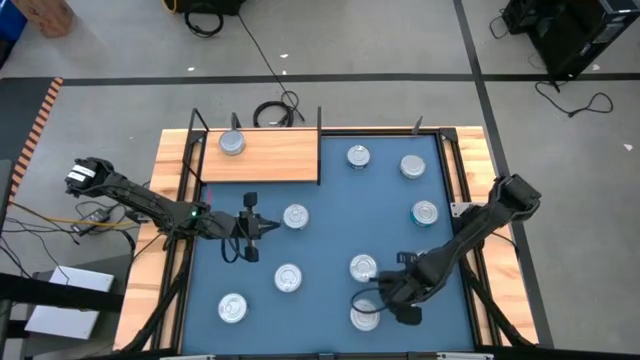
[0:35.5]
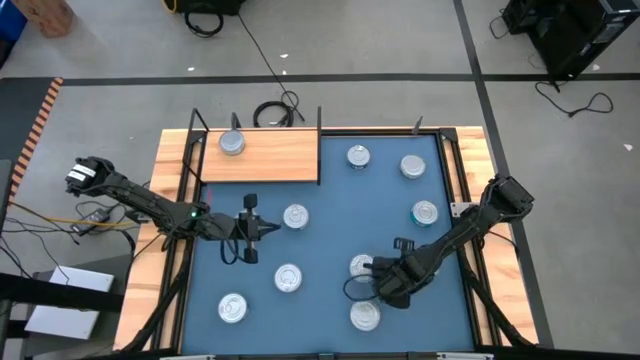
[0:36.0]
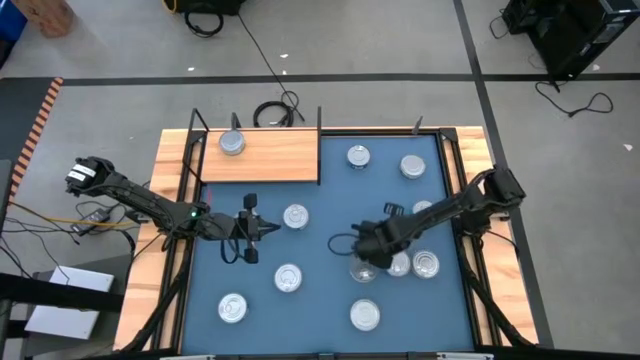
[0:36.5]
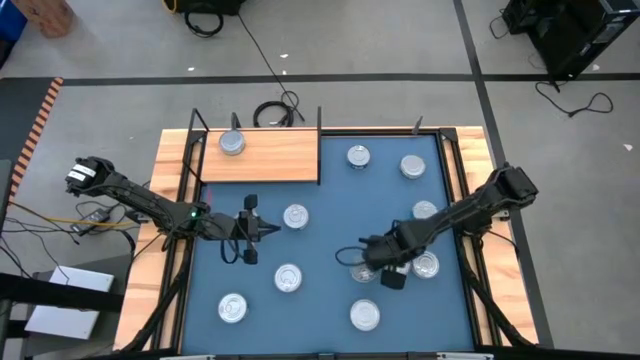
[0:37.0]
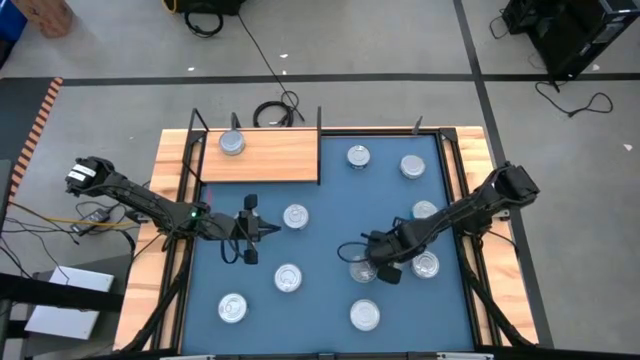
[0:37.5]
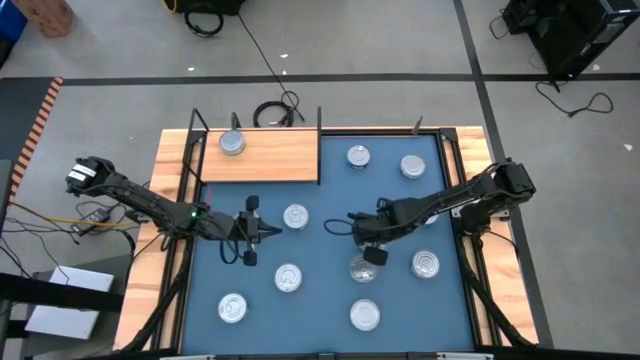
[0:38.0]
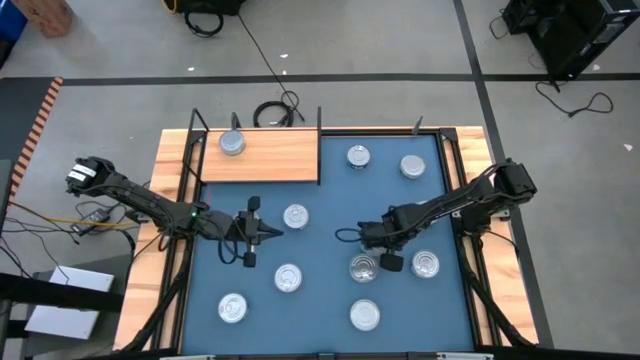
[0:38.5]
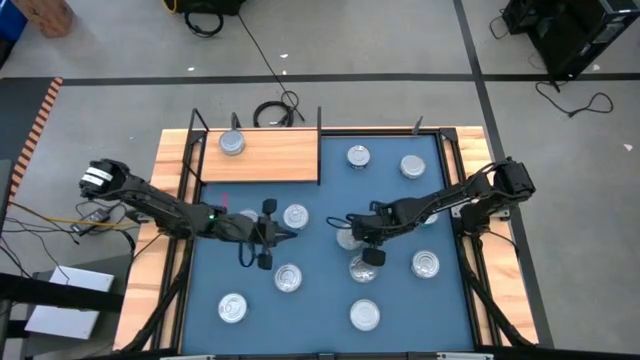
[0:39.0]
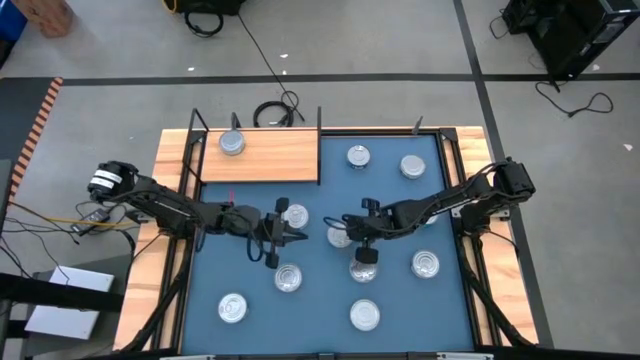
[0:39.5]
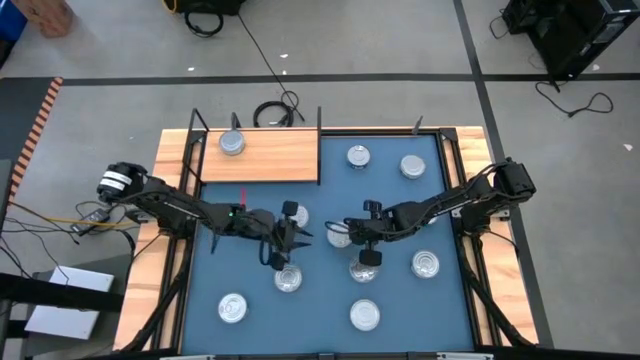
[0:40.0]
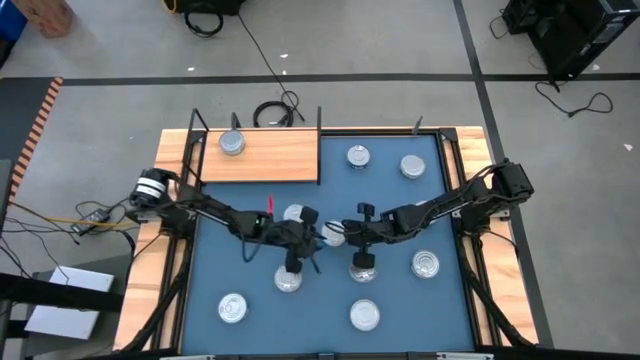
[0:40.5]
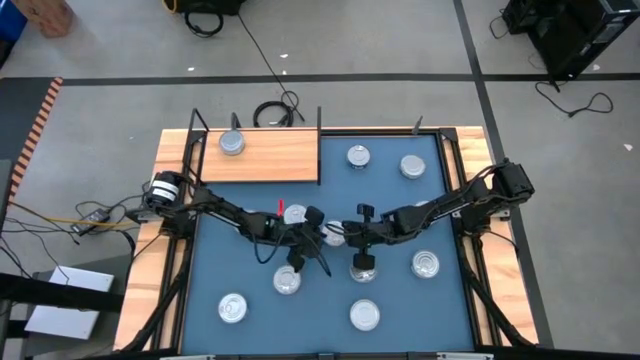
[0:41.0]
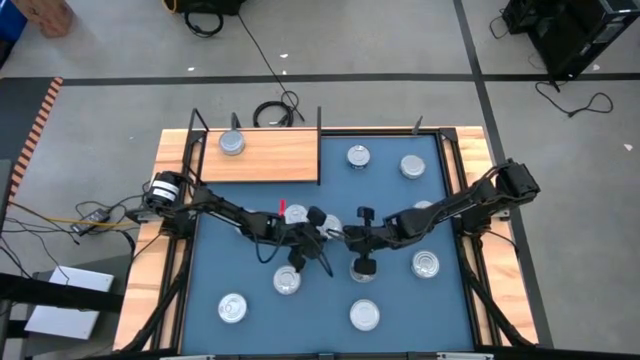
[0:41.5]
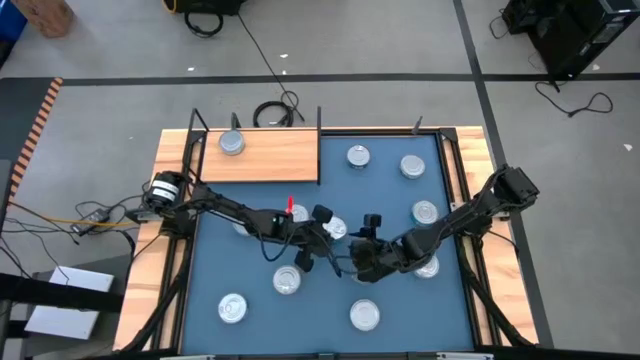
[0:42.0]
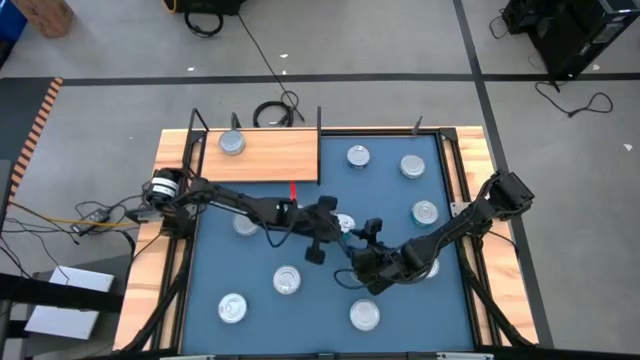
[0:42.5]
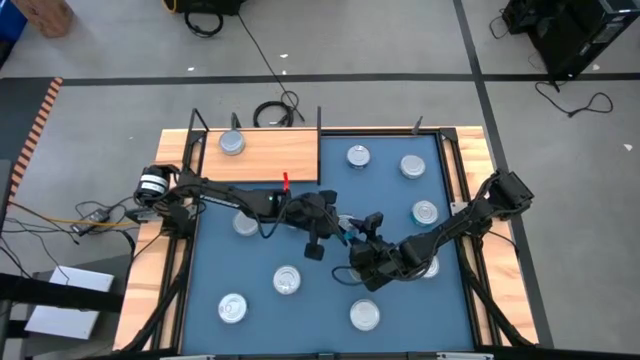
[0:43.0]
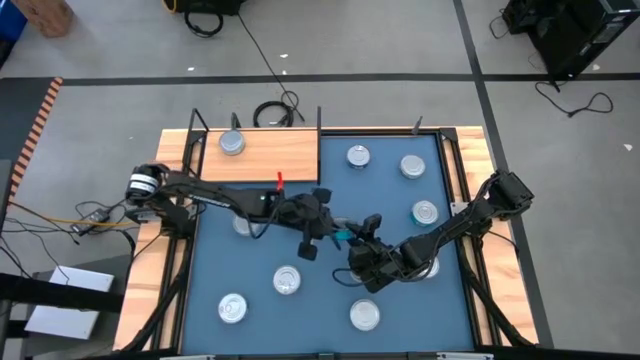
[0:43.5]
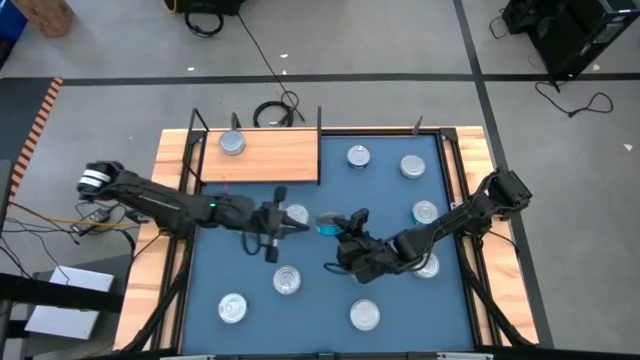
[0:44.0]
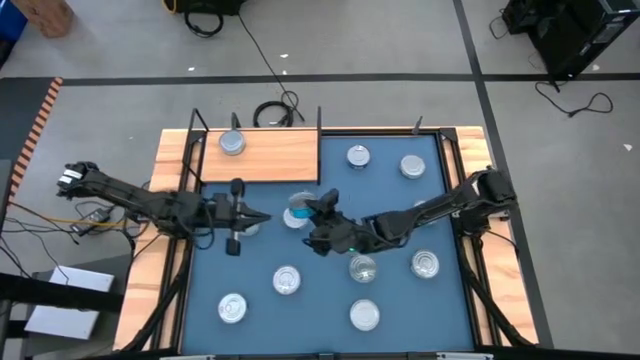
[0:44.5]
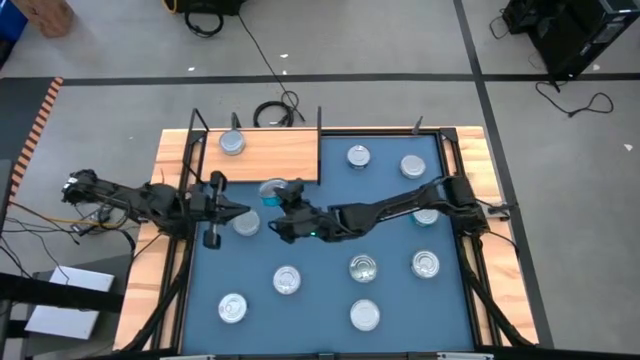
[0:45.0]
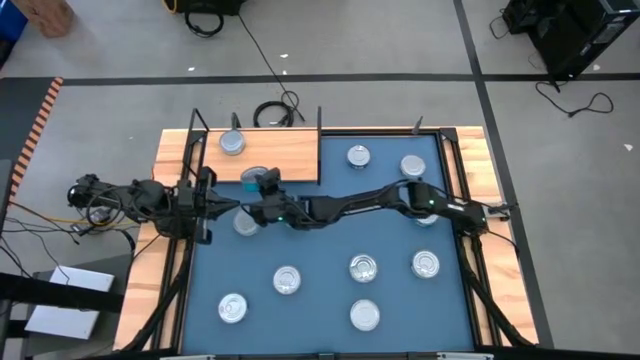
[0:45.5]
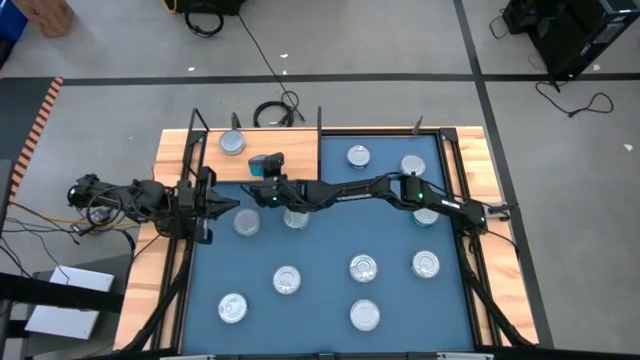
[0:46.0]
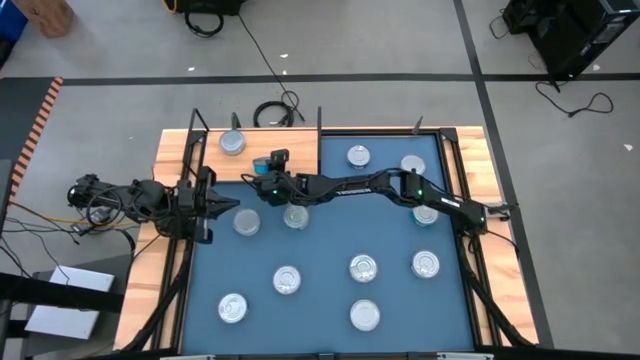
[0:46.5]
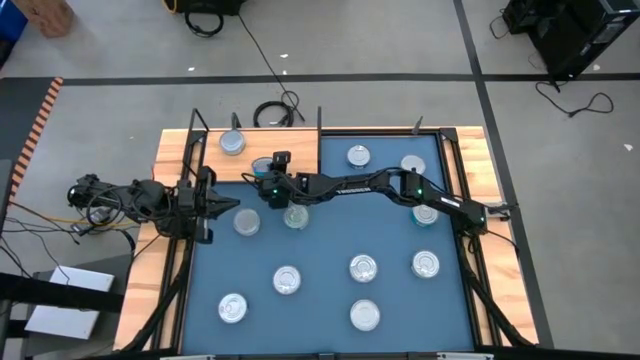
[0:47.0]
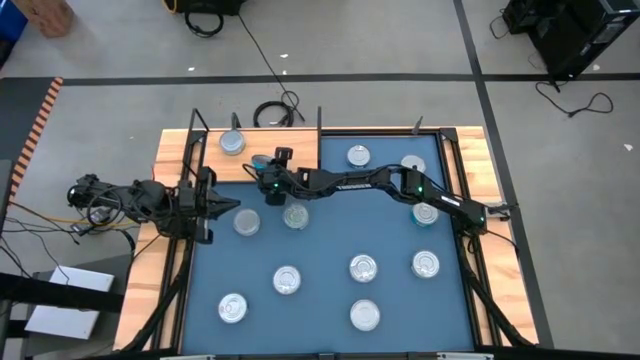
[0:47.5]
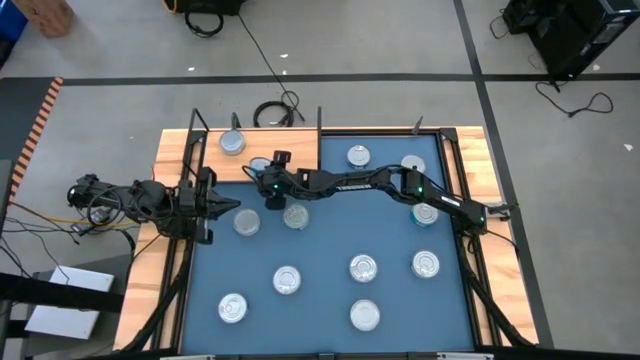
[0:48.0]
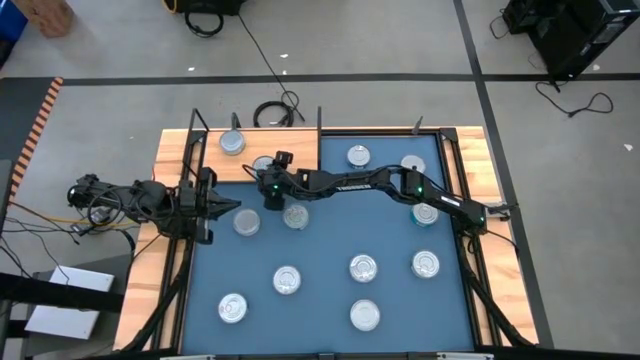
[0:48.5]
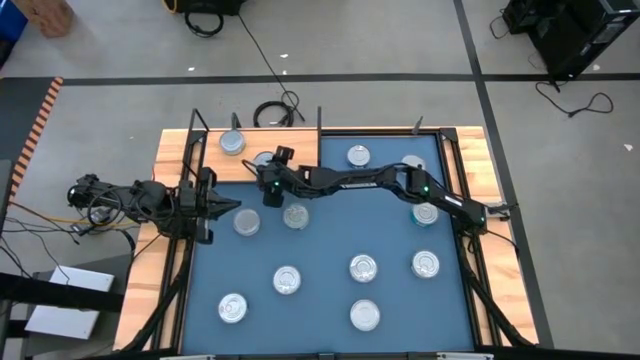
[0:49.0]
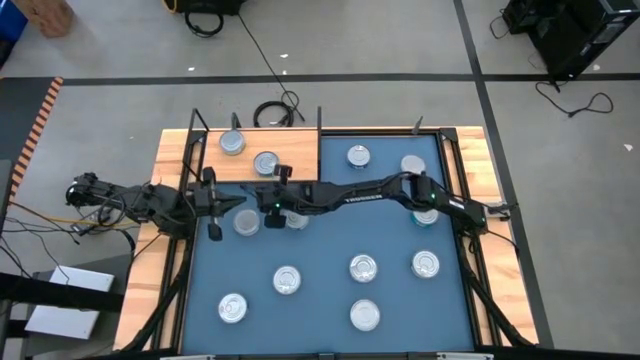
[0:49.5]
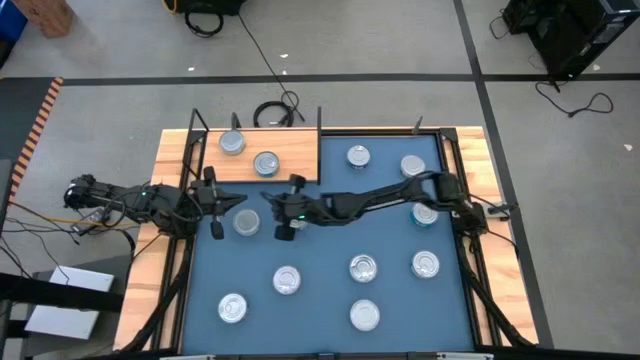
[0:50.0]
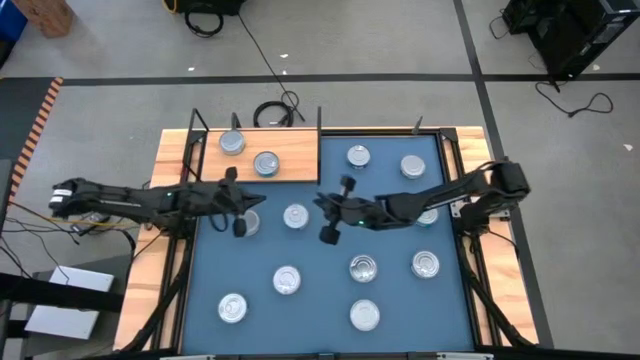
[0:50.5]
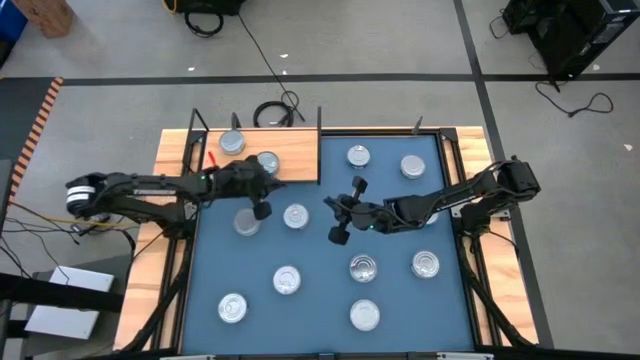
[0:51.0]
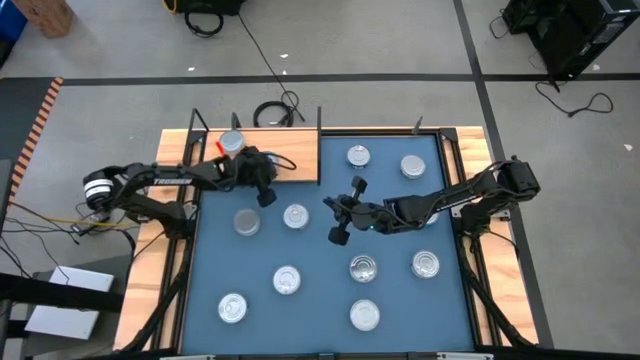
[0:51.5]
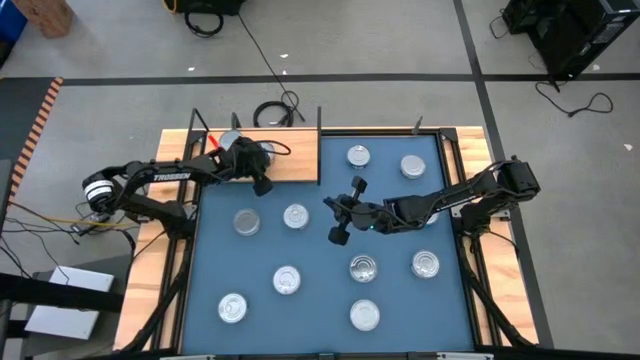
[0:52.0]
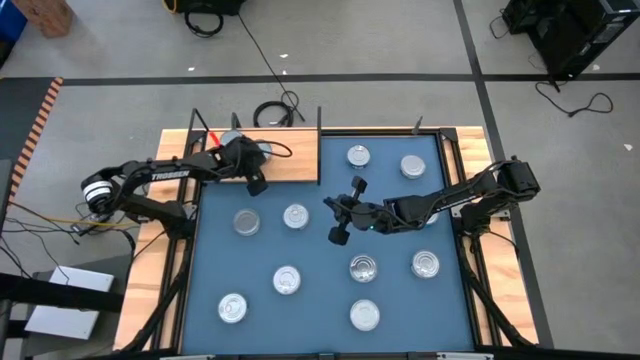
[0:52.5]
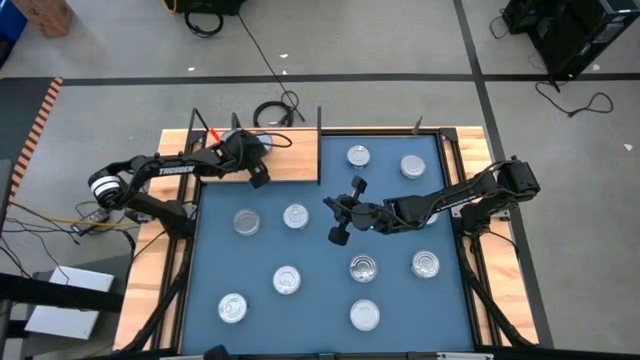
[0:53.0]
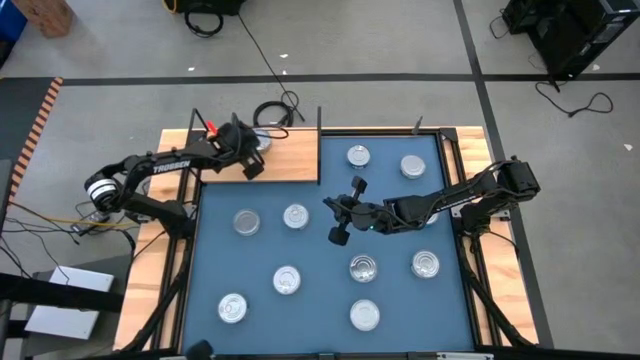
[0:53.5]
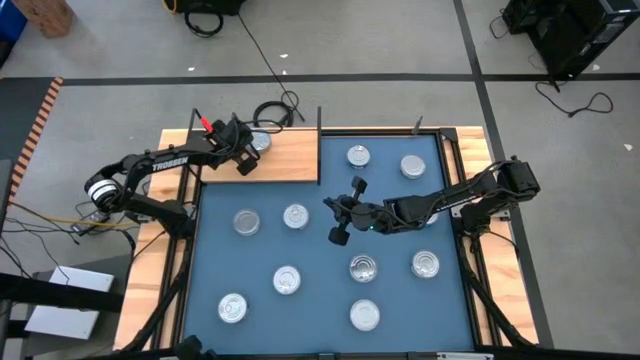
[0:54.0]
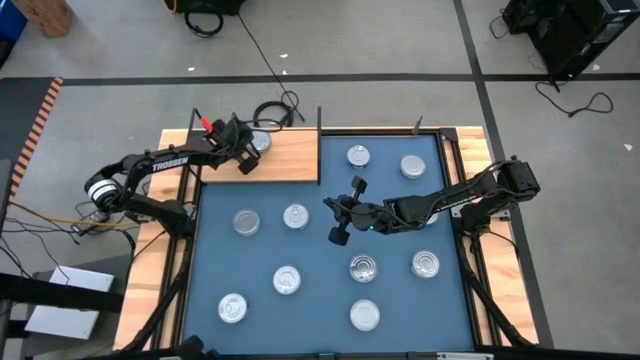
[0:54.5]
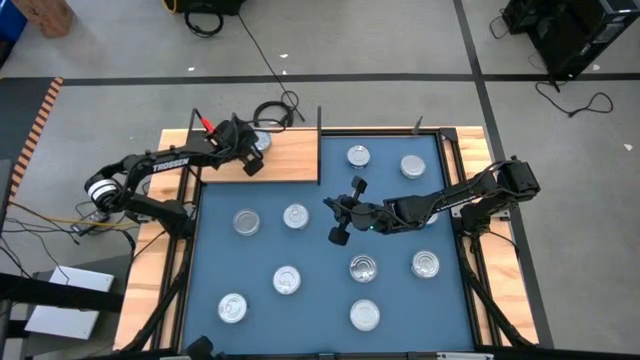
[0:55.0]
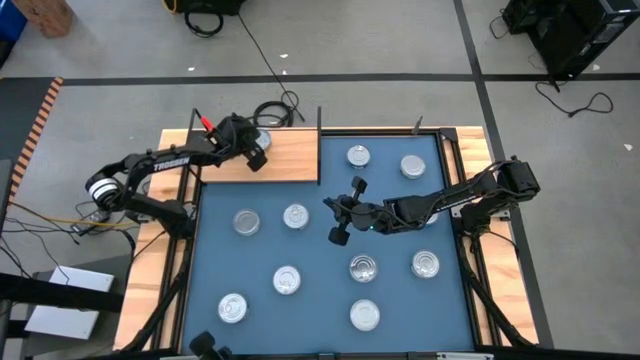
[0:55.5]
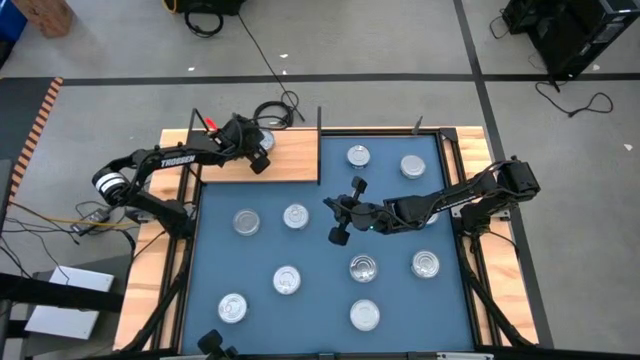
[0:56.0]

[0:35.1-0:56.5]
Task: Stack canned seafood by type on shelf
Put the yellow-blue tuna can on the shelf
